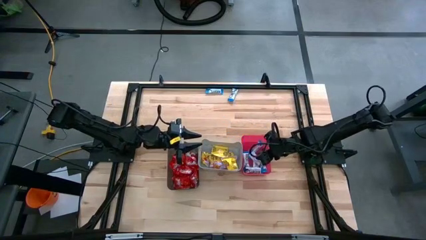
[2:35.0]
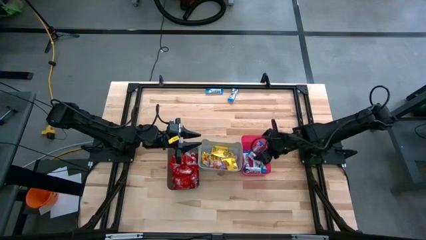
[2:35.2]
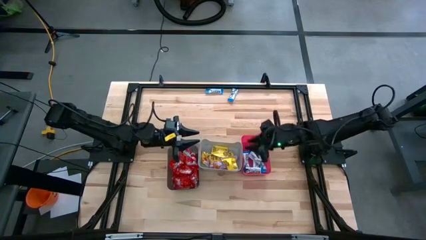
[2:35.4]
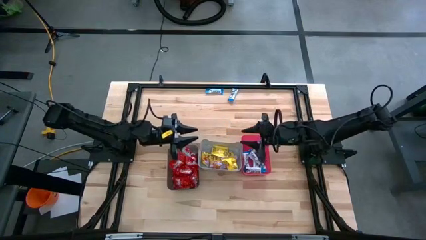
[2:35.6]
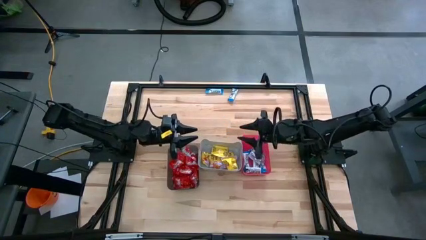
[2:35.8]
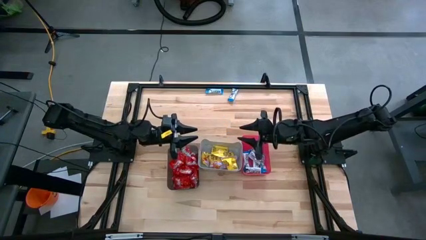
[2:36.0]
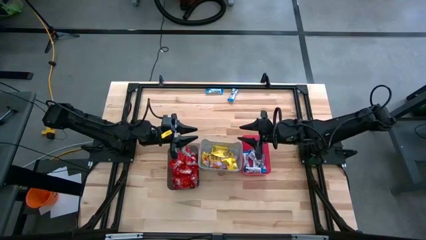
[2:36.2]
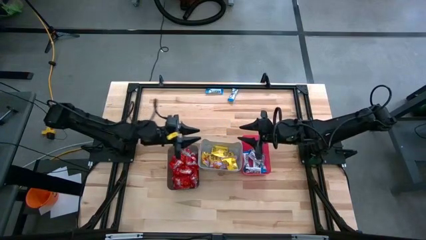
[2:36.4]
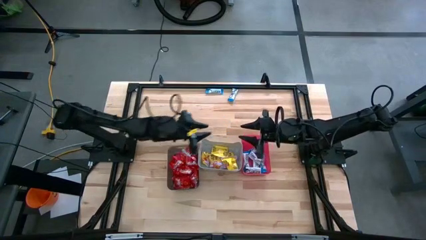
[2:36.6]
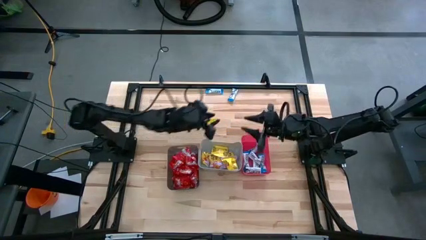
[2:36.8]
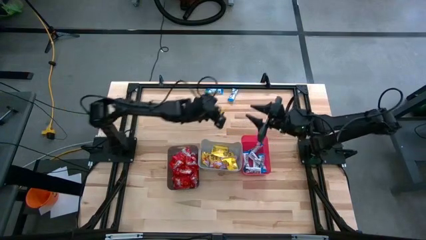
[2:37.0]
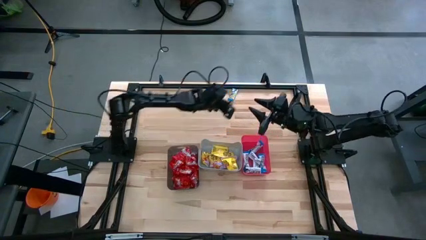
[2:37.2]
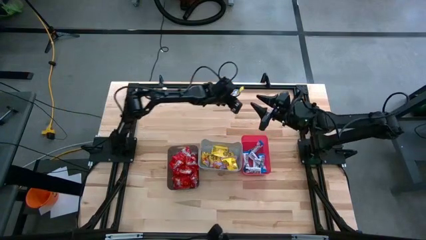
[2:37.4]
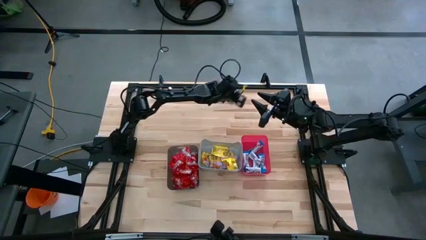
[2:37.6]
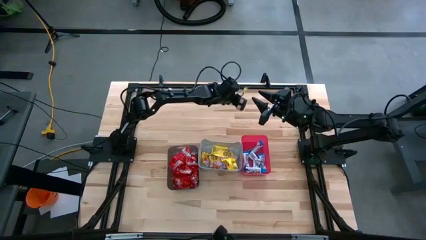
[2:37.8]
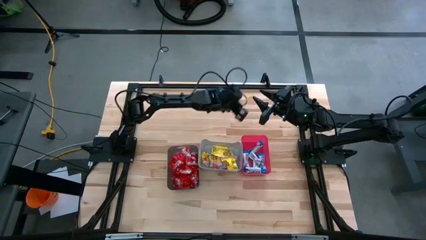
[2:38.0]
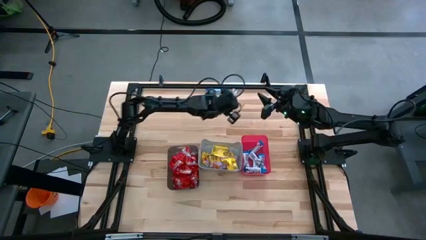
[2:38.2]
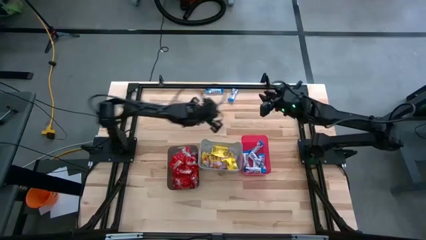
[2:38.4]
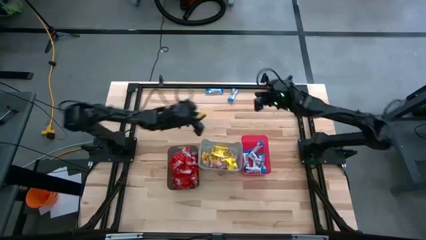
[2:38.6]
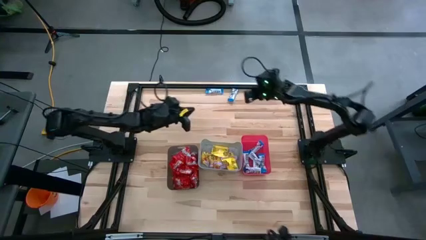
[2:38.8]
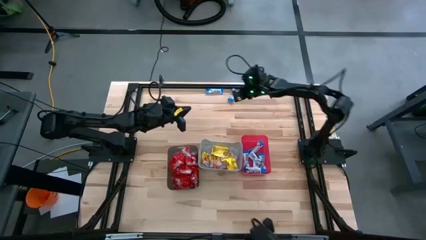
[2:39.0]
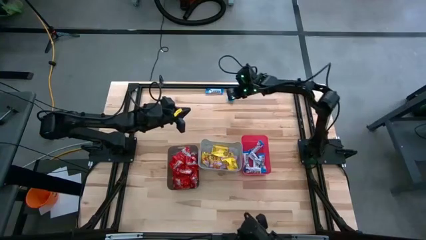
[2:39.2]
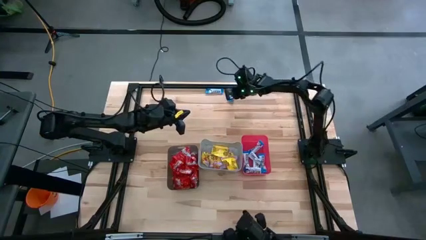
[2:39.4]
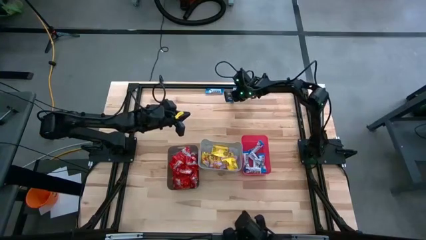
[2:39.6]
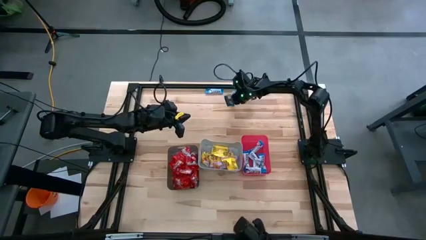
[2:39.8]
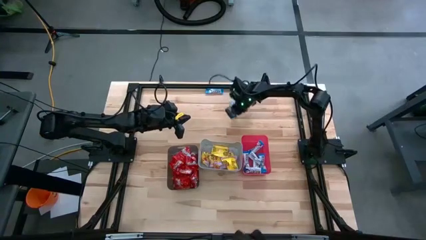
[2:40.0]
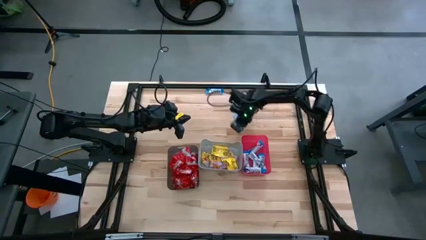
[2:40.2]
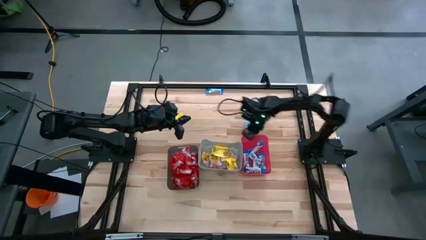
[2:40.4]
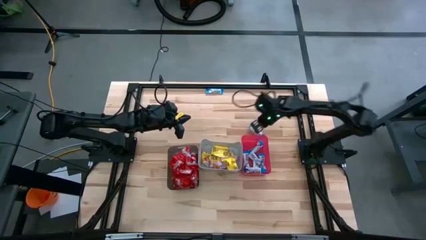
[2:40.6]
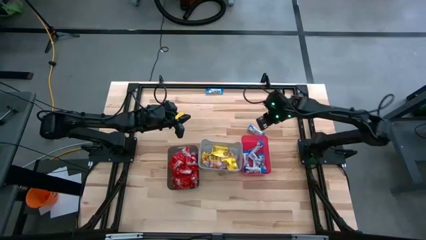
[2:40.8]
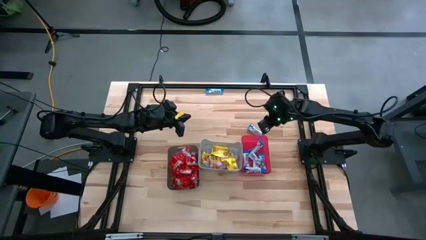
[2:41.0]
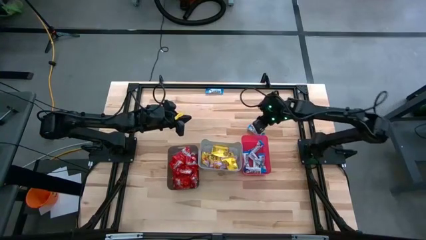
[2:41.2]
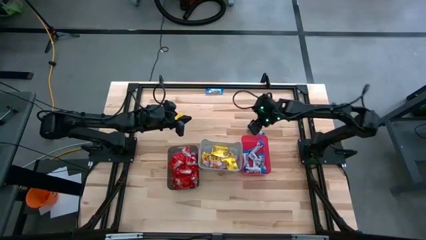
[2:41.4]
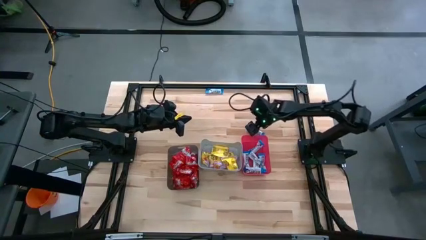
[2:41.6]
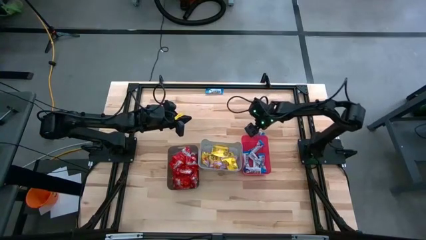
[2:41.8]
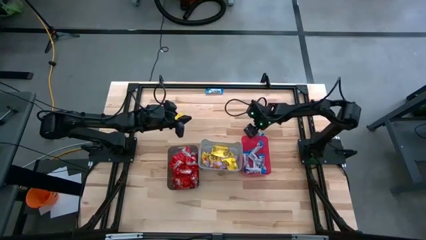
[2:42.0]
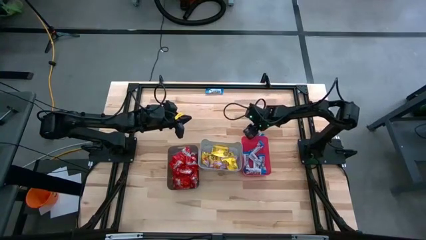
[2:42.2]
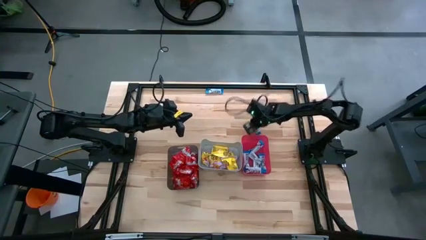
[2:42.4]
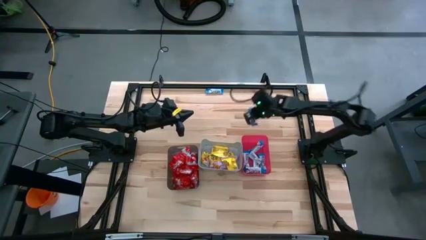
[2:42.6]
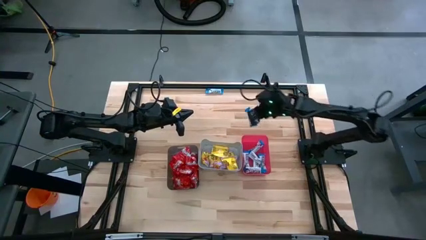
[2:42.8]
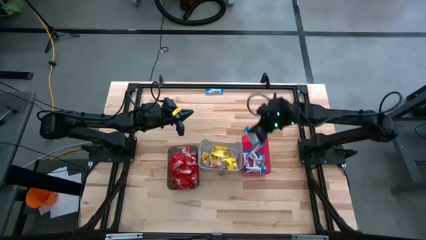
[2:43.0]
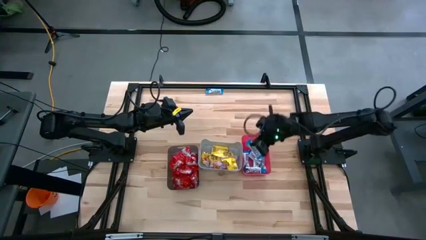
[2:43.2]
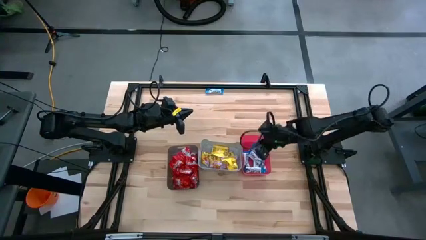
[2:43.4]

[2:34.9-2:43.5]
Task: Sort candy
Put the white chocolate into the pink bin

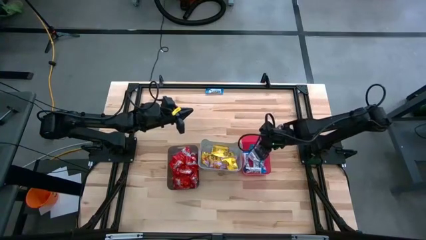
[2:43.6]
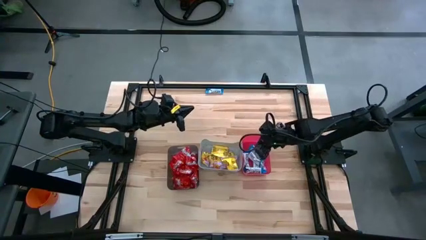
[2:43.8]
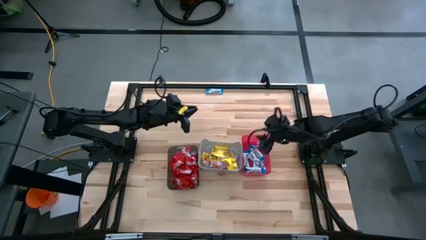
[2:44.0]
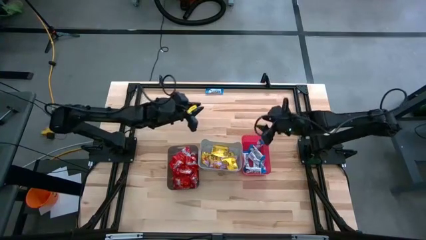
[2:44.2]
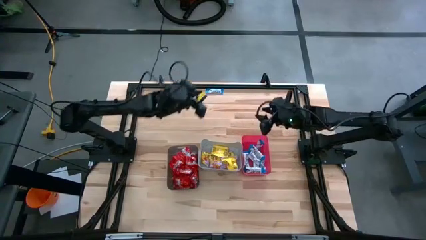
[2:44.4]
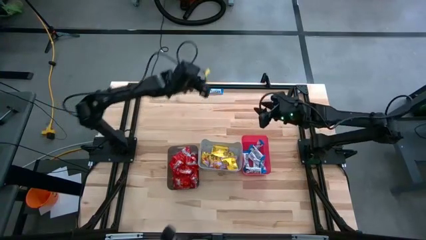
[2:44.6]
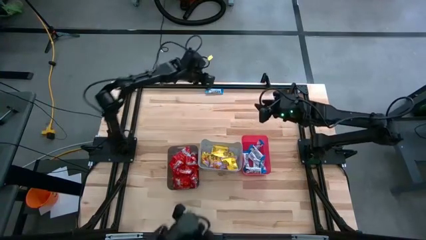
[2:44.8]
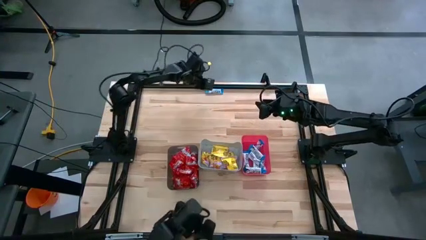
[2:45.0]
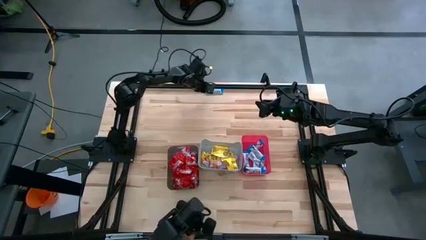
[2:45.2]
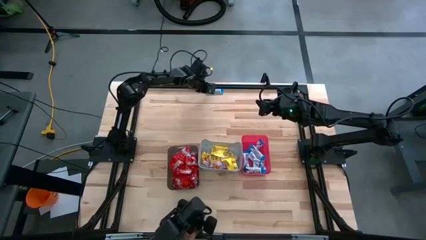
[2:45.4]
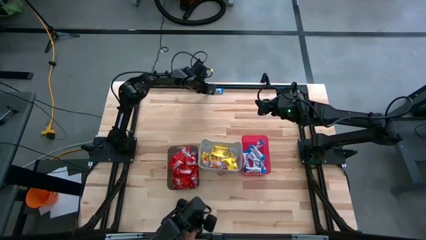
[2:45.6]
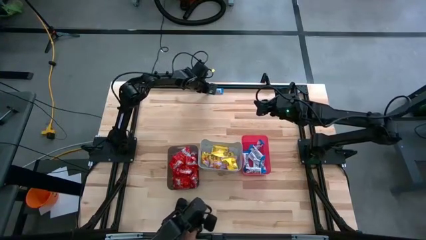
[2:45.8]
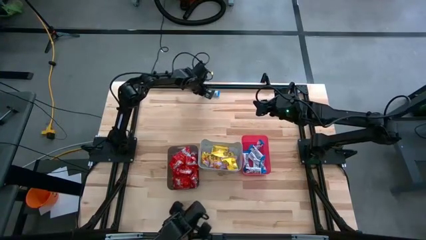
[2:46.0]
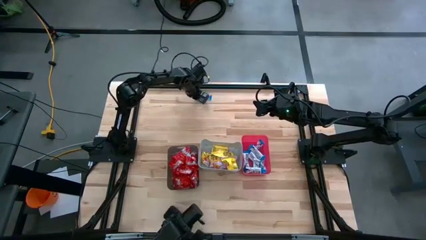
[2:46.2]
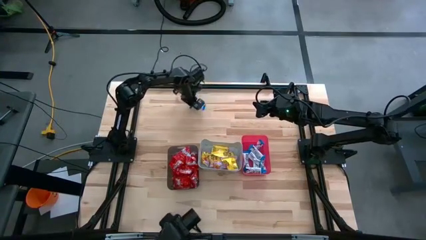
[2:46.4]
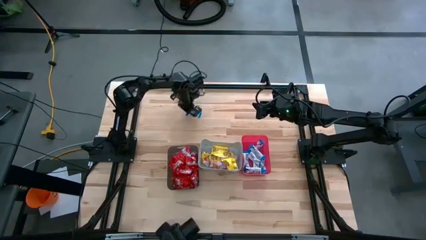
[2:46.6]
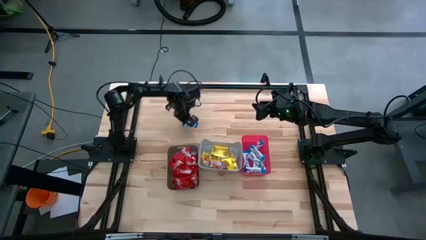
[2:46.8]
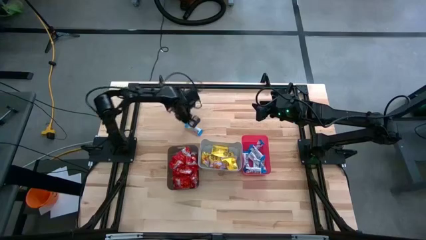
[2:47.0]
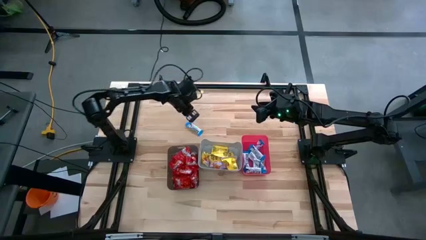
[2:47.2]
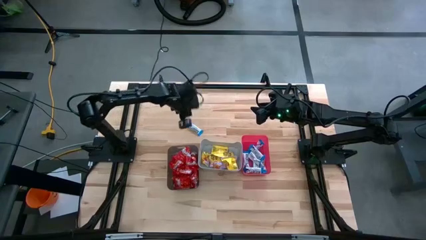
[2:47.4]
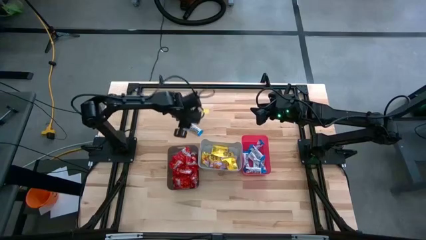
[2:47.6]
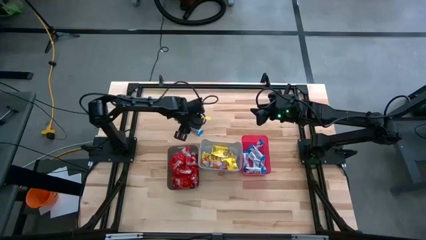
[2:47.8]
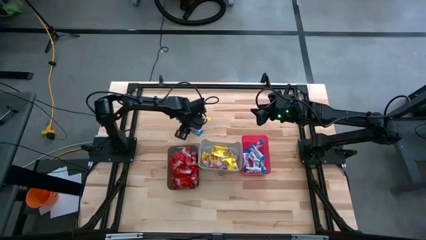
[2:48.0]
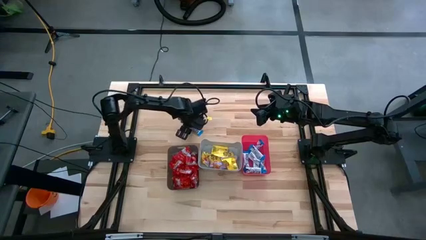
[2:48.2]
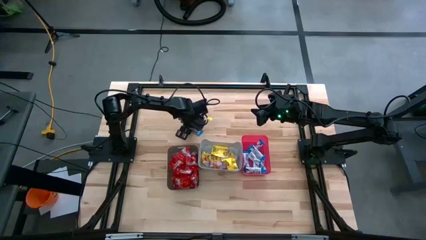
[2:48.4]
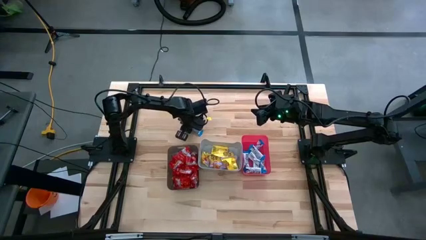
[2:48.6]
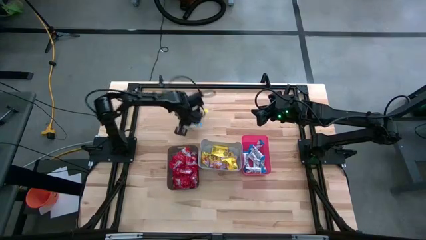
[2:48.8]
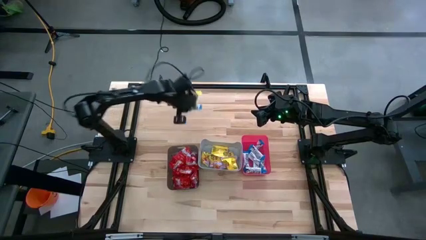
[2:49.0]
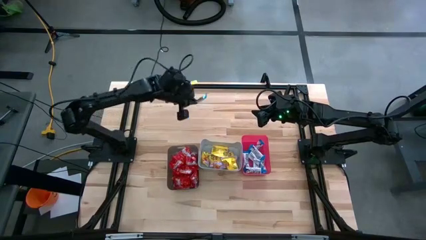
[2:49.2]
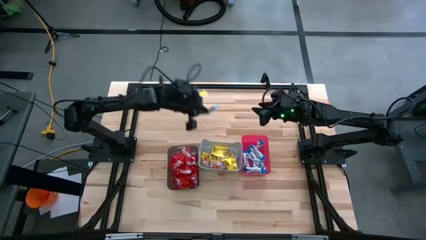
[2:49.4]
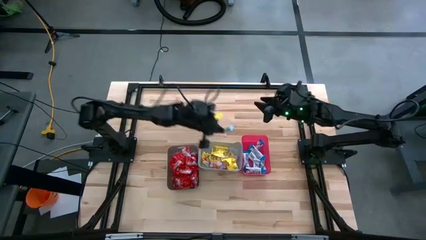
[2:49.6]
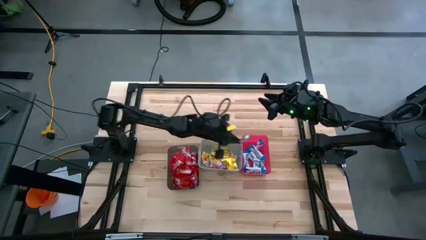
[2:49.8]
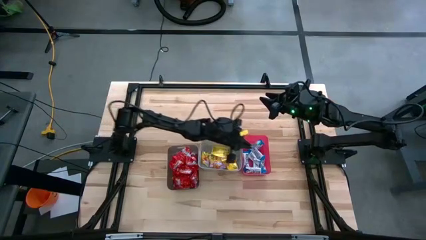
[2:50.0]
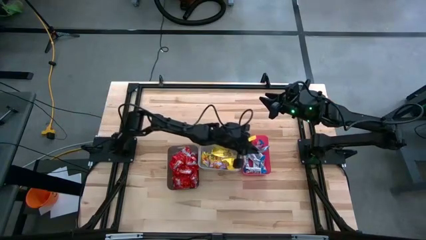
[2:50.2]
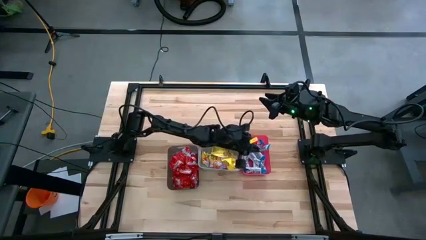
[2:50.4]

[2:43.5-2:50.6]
Put the white chocolate into the pink bin

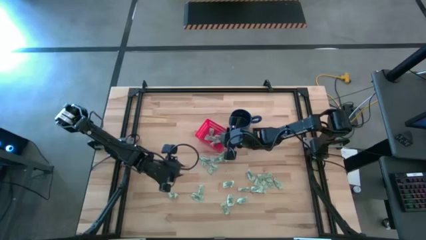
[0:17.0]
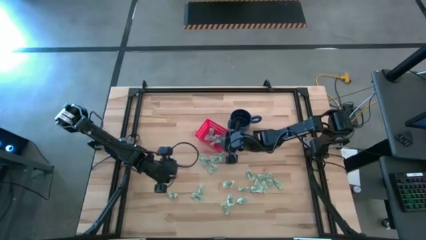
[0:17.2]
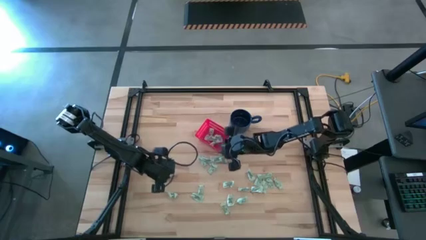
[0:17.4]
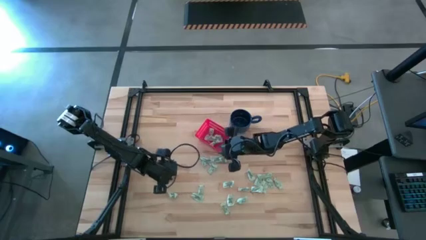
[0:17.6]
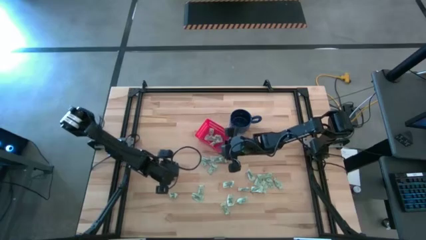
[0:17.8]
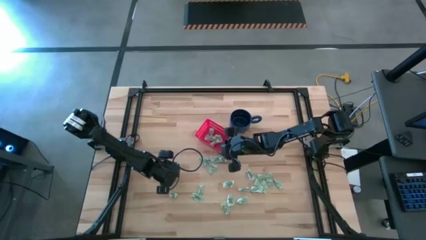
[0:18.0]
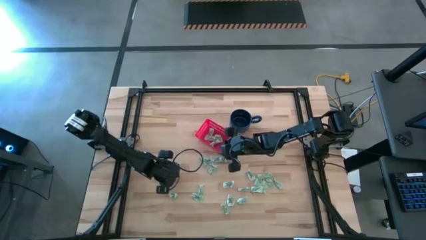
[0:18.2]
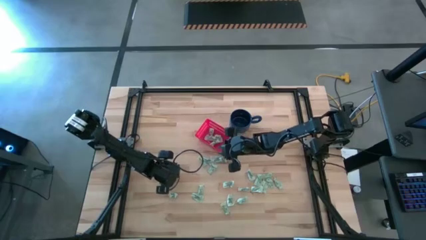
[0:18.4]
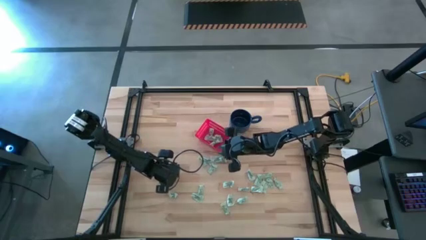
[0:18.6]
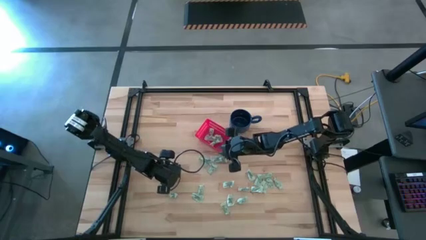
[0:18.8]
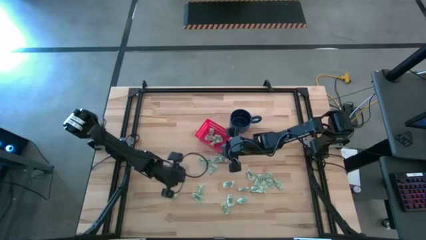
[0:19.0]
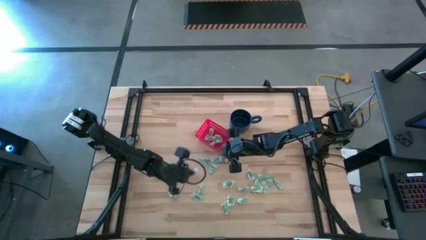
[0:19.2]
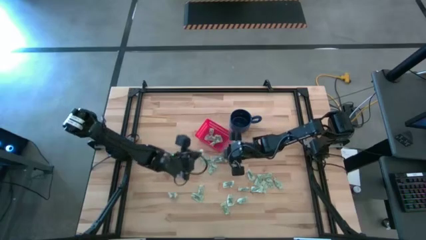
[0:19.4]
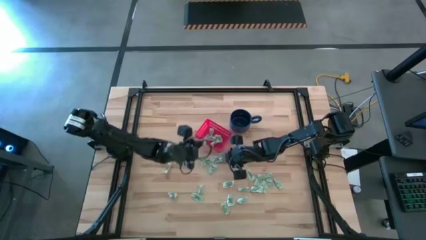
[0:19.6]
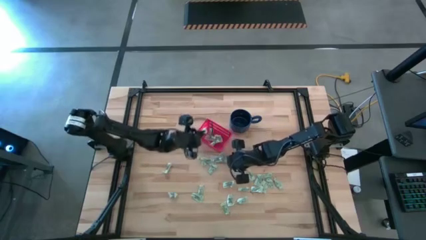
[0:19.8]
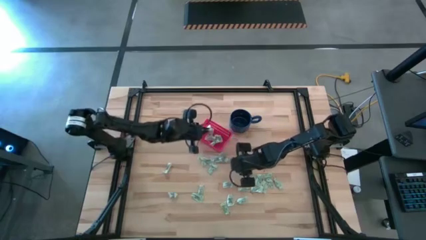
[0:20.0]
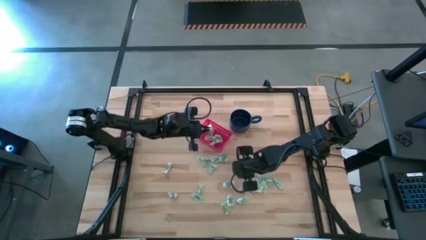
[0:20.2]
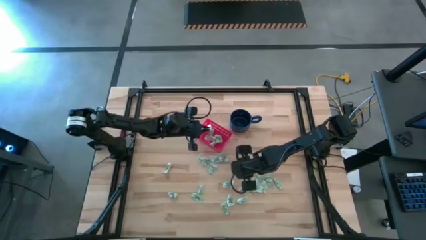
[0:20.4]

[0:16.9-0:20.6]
Task: Pick and place items into bin
Put the stevia packet into the bin
